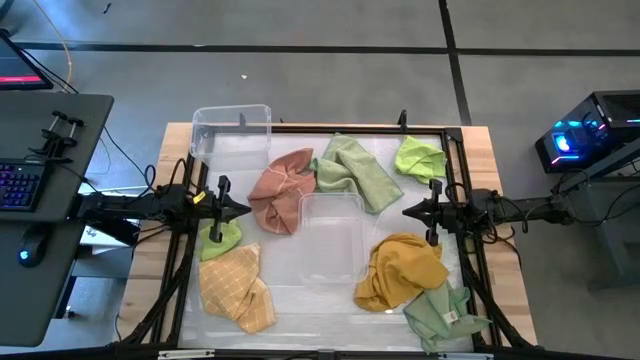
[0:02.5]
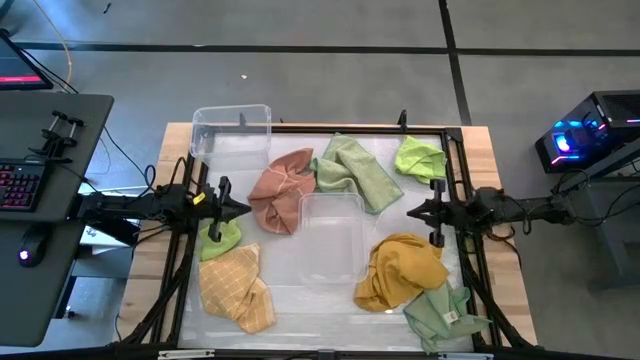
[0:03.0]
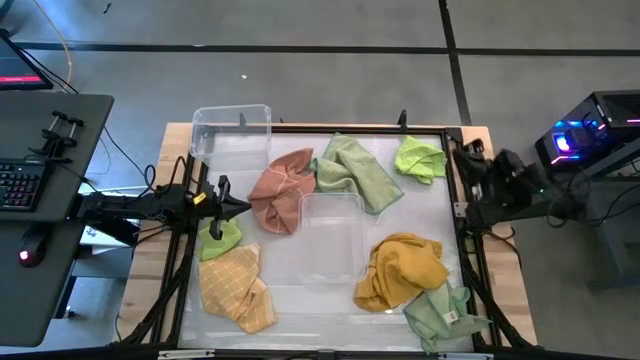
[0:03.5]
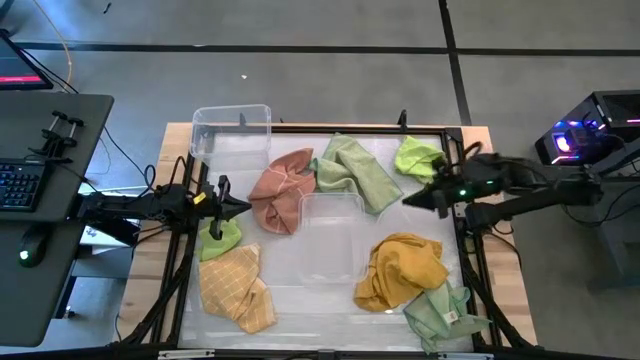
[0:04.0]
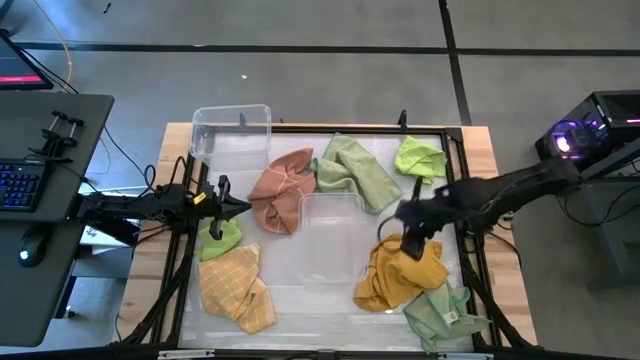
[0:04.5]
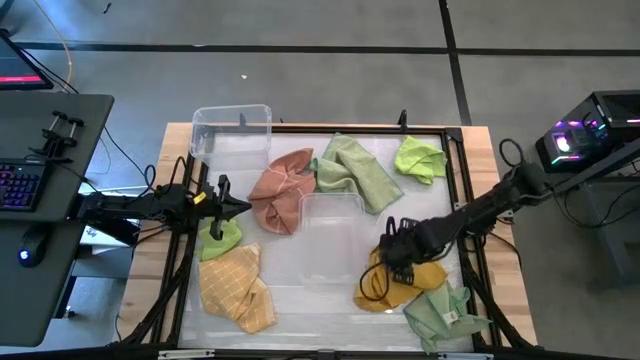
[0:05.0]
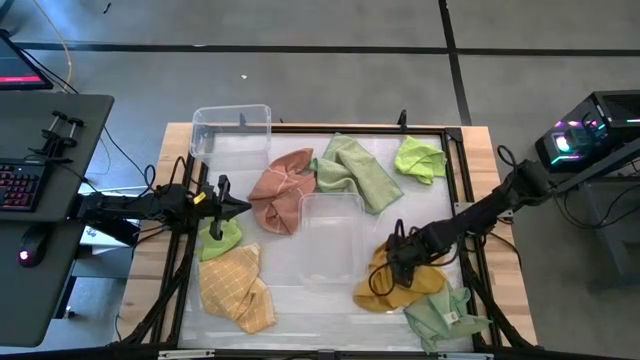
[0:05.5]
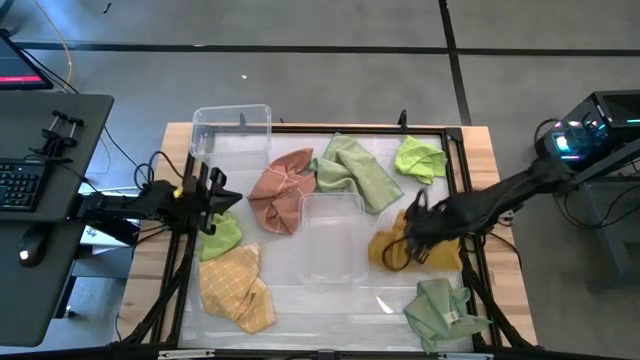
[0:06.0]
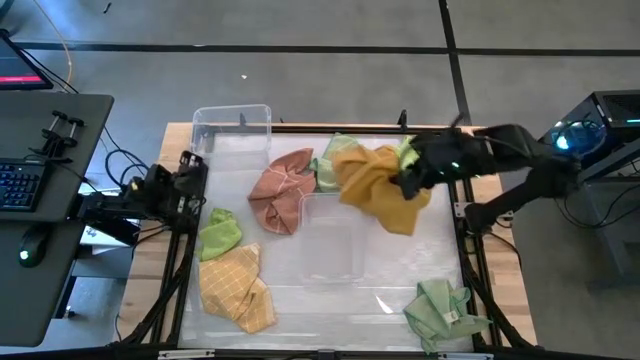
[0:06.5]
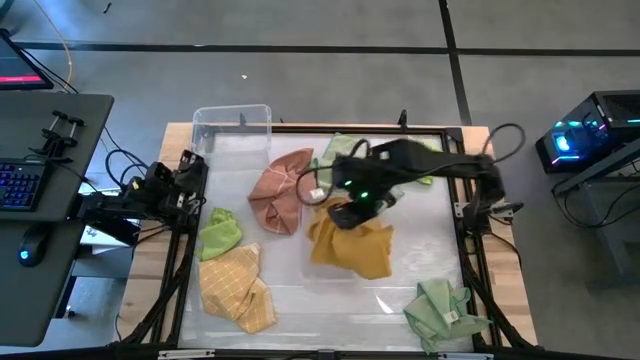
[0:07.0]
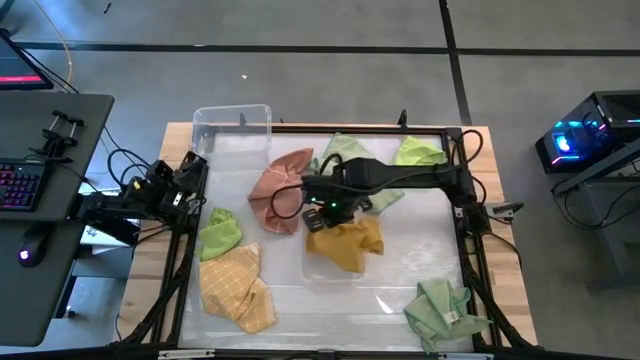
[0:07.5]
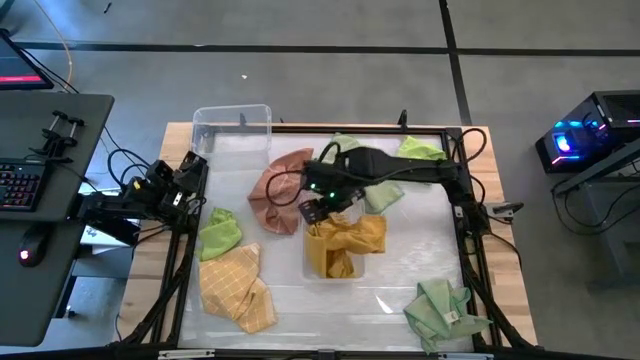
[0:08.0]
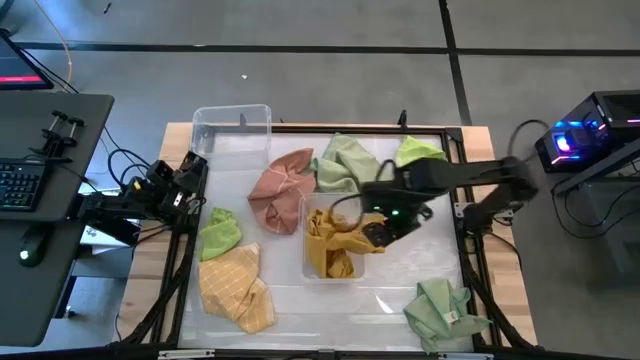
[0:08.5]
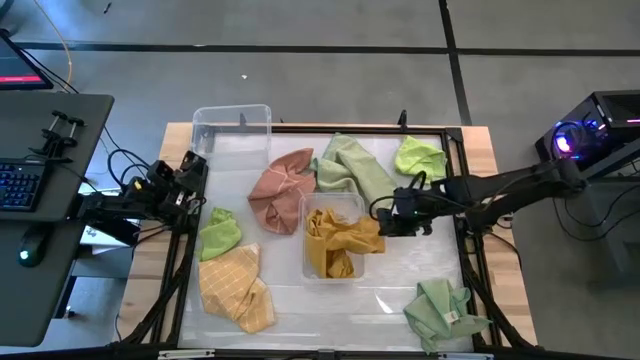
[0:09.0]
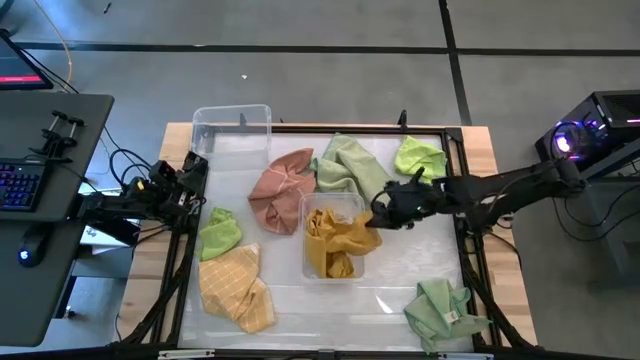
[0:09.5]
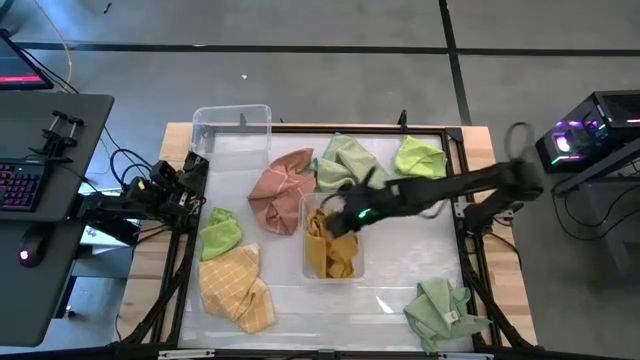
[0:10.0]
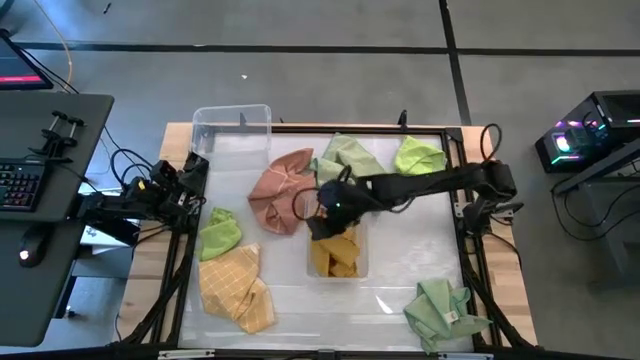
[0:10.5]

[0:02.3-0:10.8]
Task: Sort towels by color in basket
Put the brown towel into the bottom transparent bin

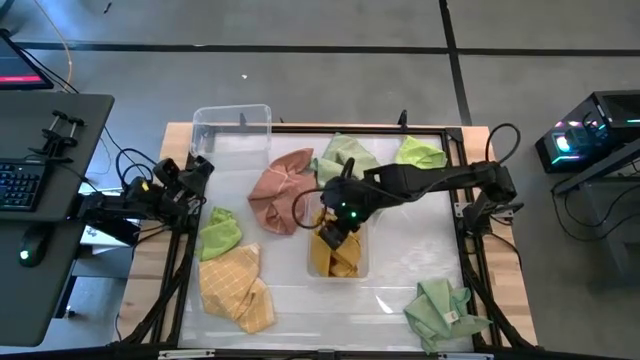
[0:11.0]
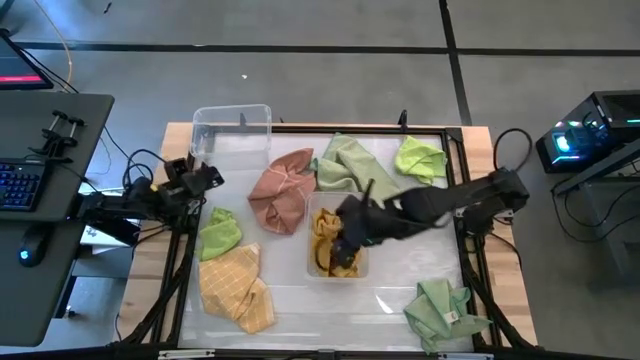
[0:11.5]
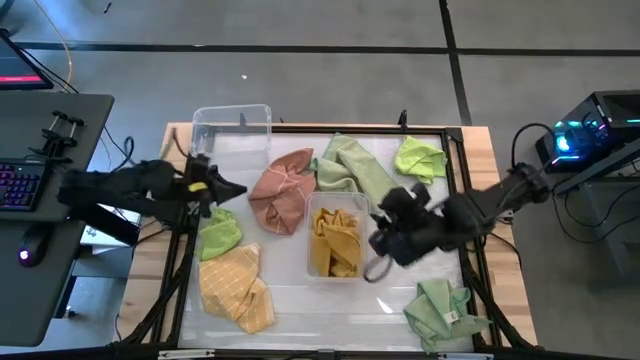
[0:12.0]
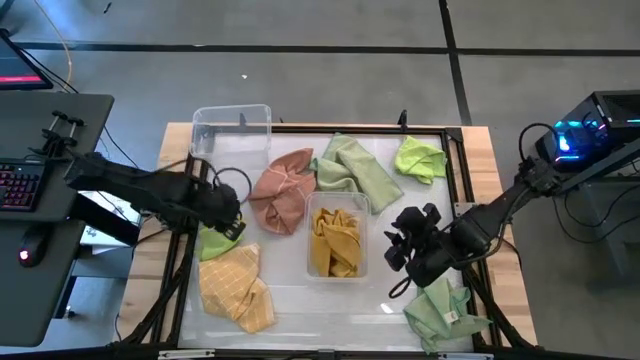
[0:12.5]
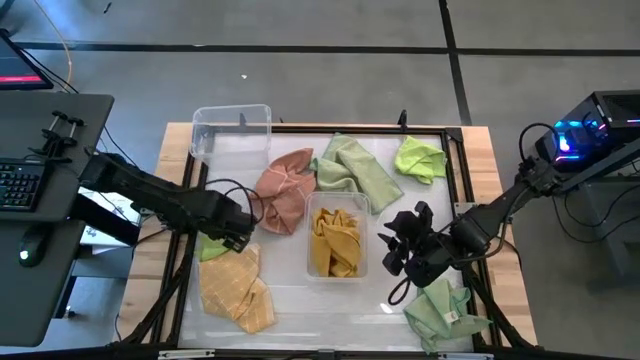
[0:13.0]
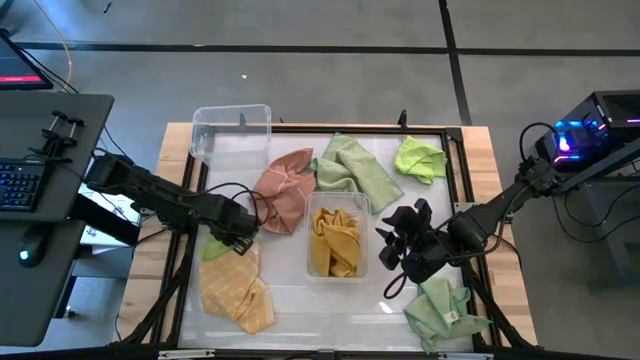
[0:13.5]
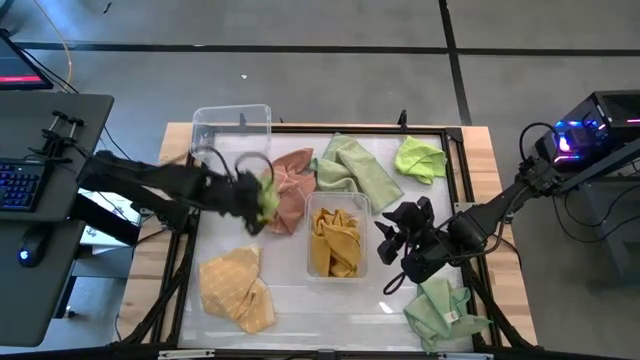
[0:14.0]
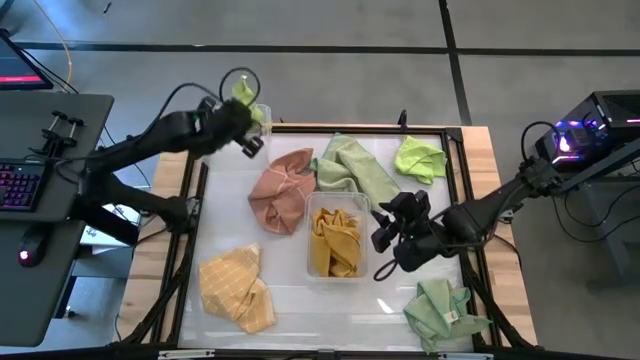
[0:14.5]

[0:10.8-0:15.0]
Put the bottom green towel into the top transparent bin

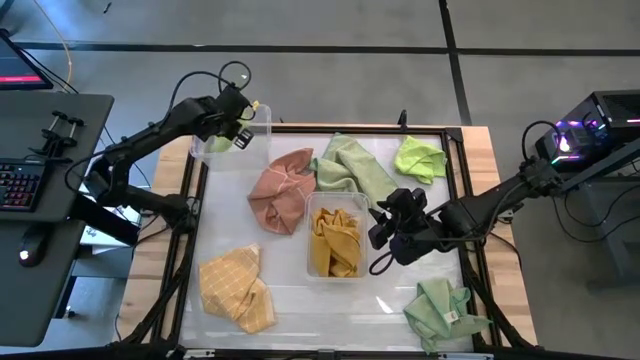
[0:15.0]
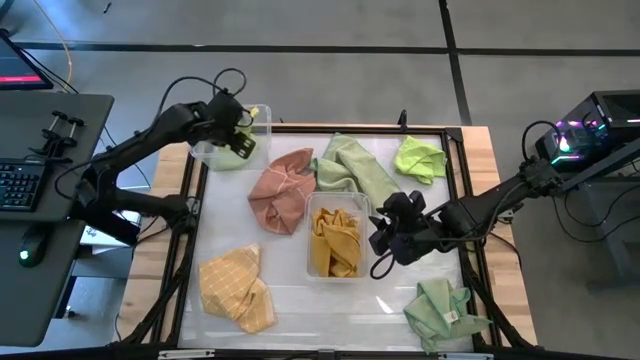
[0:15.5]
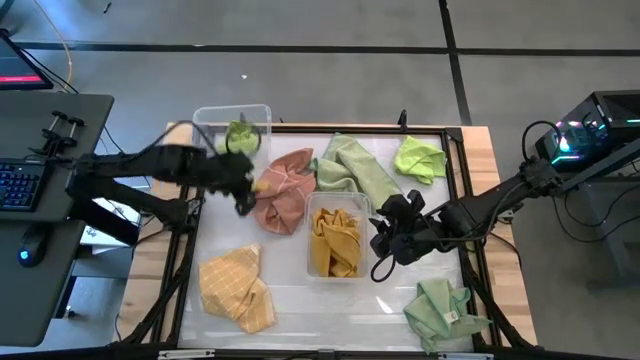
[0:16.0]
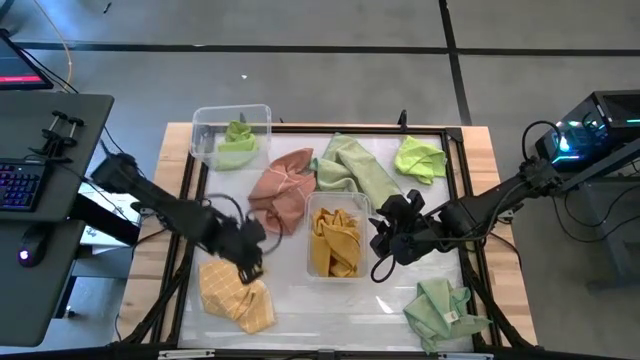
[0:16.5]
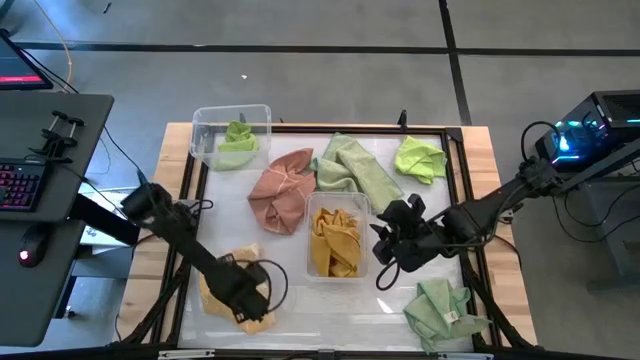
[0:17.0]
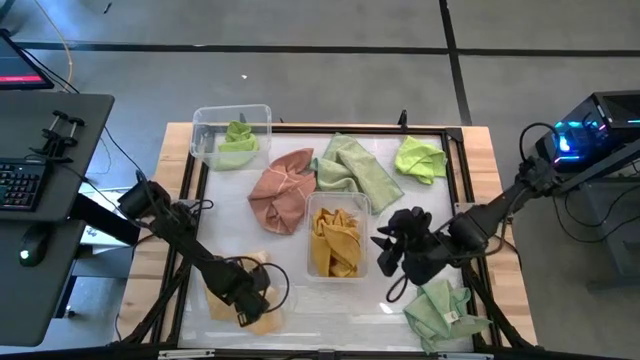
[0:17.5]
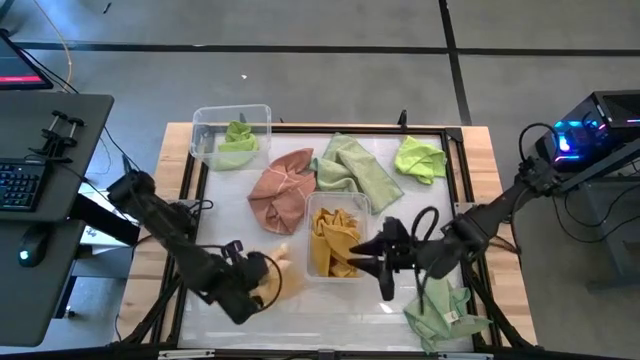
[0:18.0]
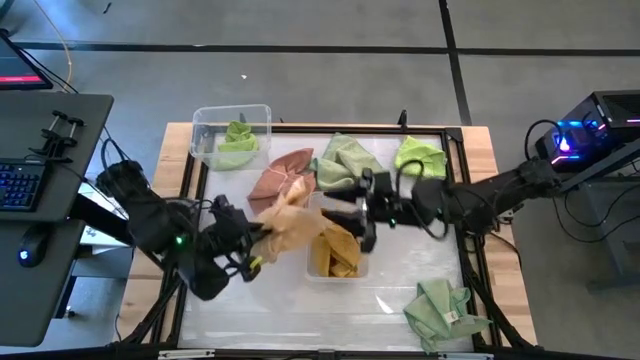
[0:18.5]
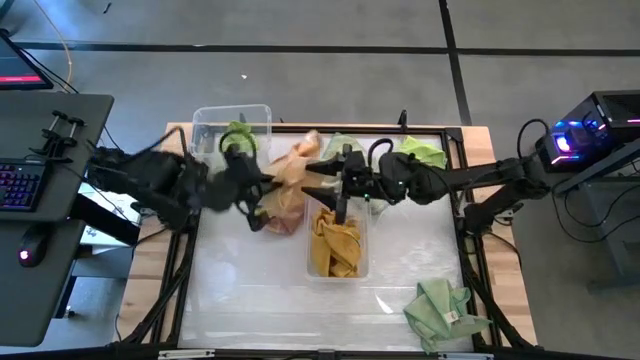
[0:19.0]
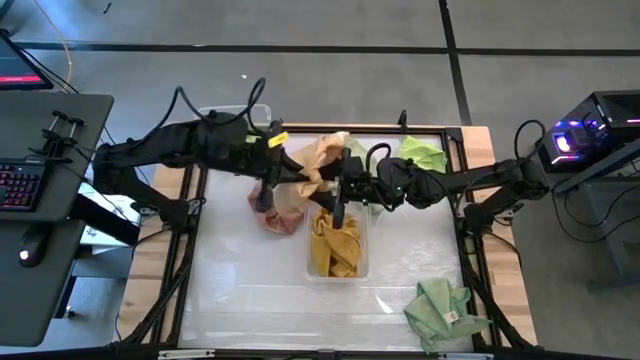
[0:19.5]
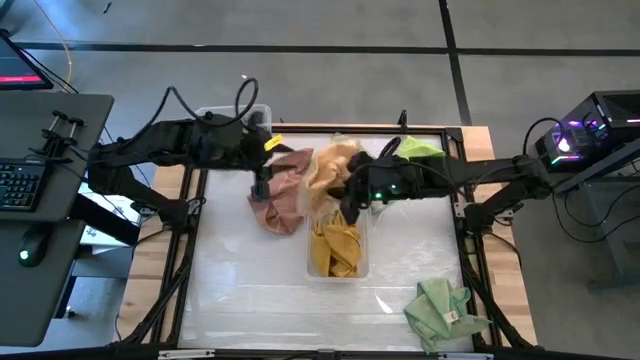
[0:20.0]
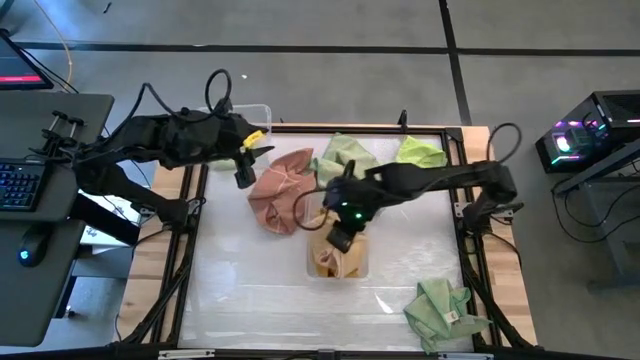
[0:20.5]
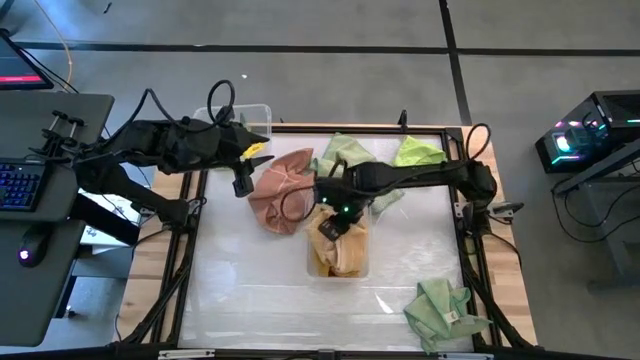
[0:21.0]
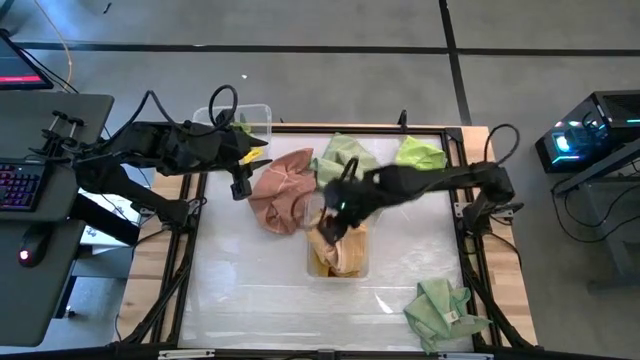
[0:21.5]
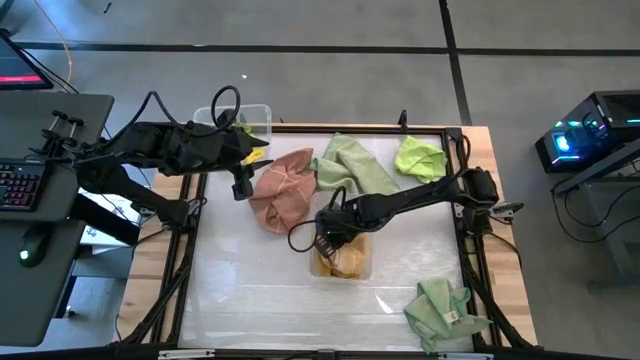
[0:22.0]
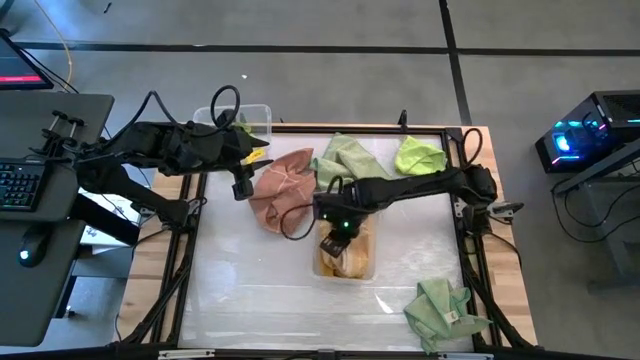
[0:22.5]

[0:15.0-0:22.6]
Put the yellow towel into the bottom transparent bin

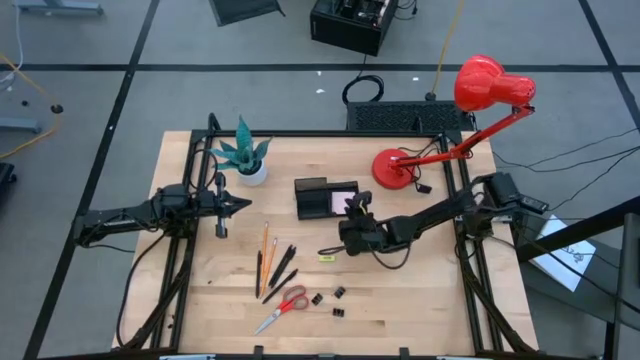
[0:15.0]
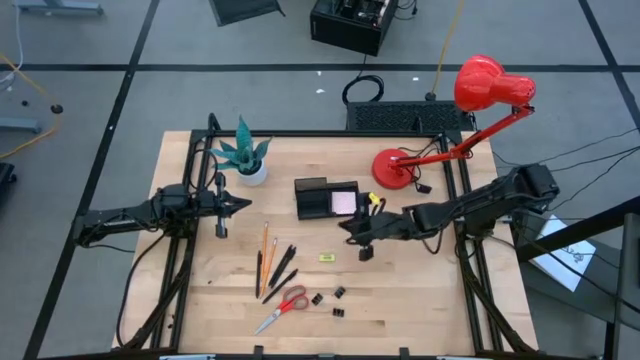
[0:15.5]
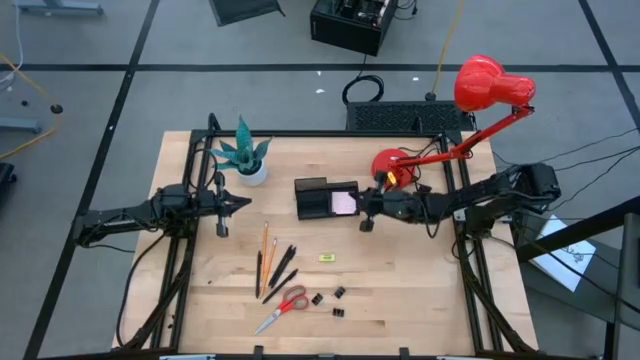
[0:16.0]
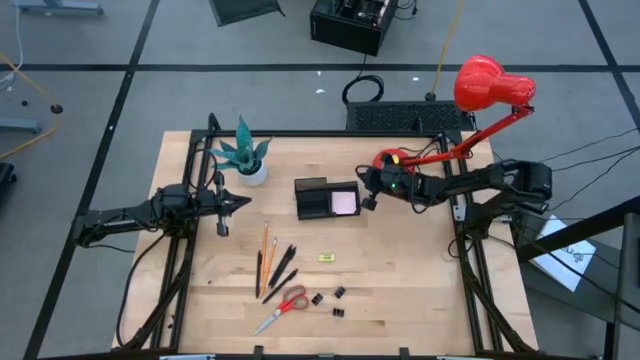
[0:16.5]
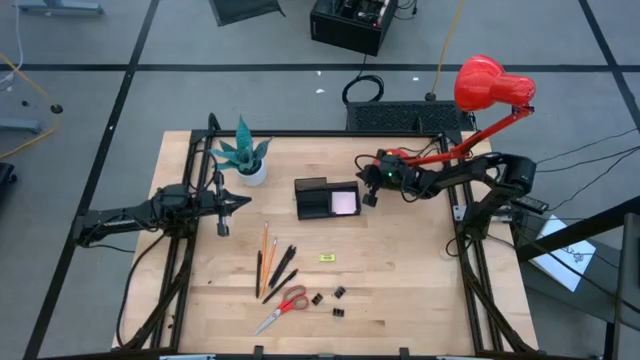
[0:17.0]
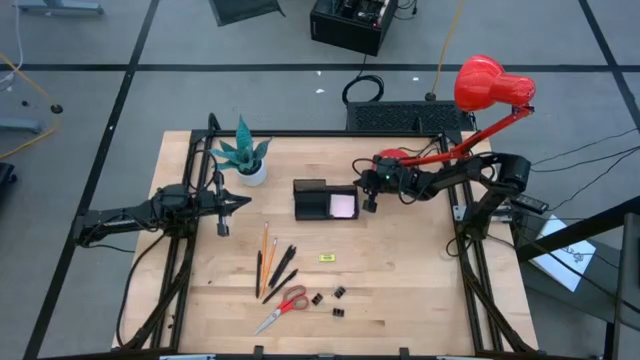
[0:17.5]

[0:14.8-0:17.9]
Task: Pick and place office supplies into organizer
Adjust the black desk organizer
